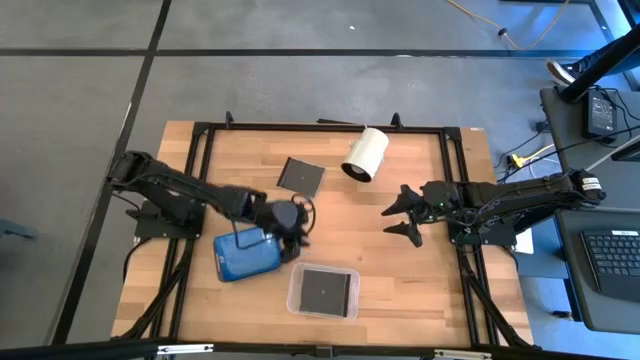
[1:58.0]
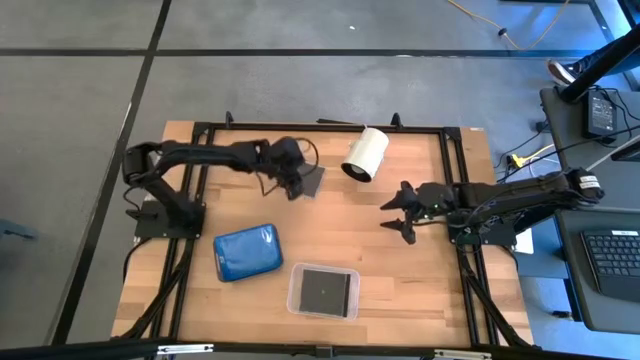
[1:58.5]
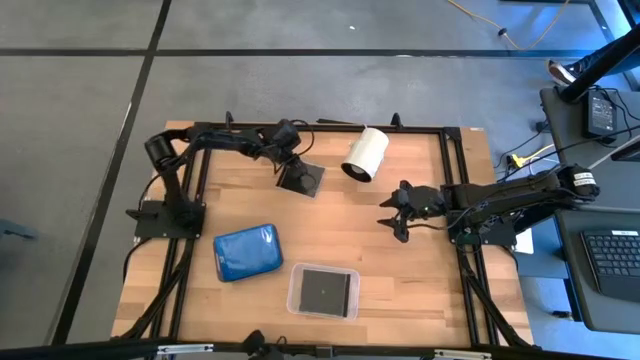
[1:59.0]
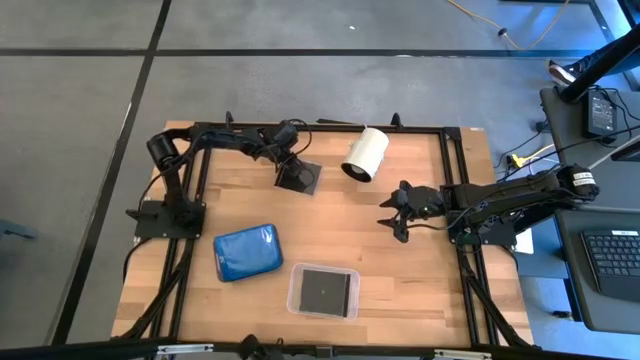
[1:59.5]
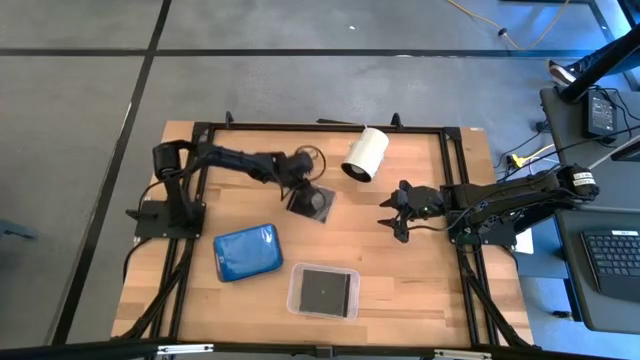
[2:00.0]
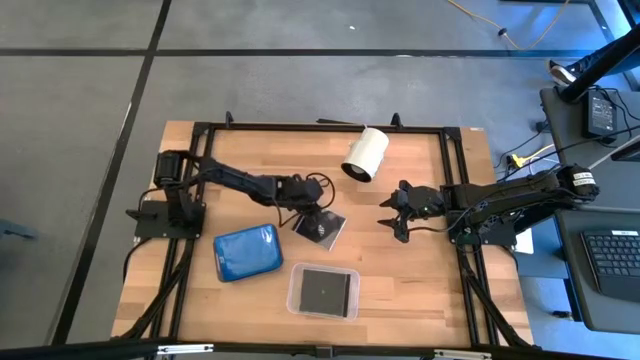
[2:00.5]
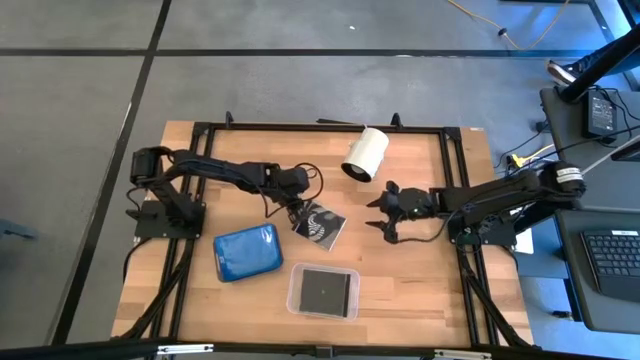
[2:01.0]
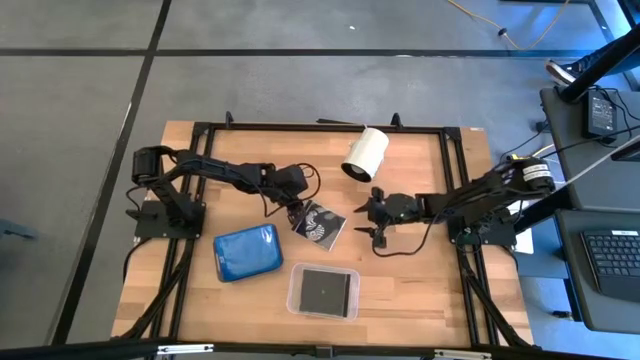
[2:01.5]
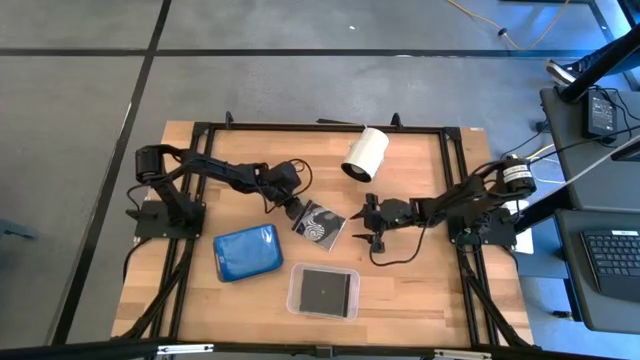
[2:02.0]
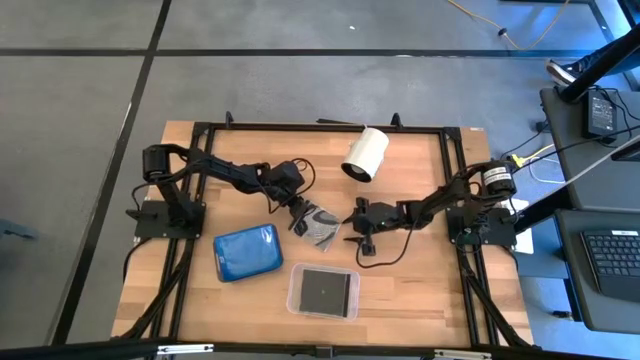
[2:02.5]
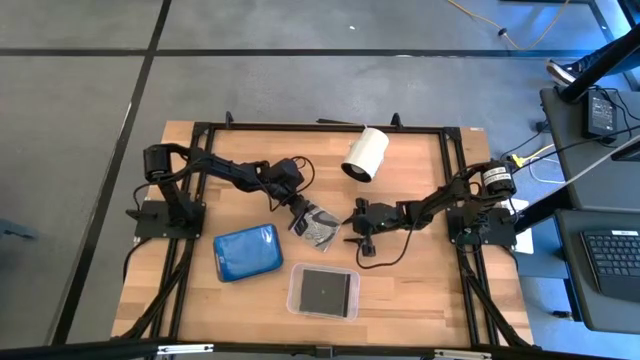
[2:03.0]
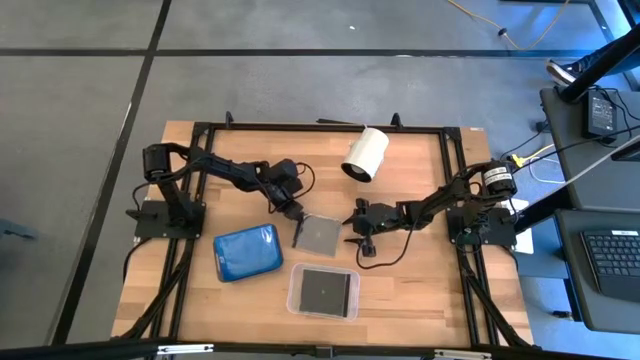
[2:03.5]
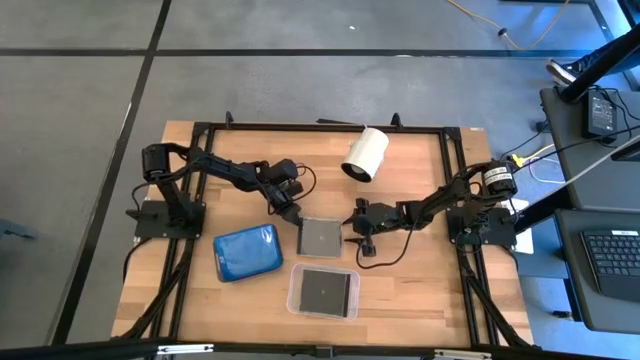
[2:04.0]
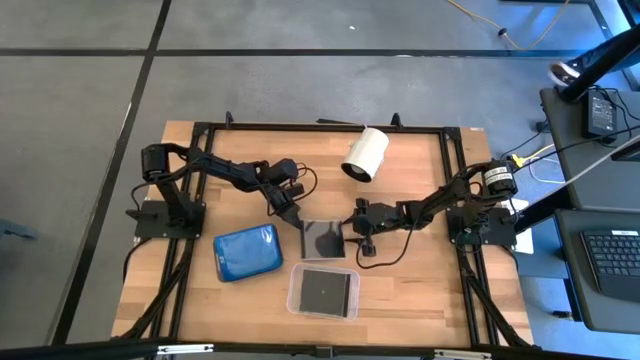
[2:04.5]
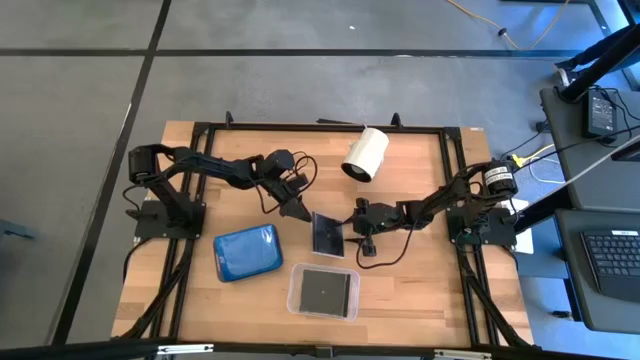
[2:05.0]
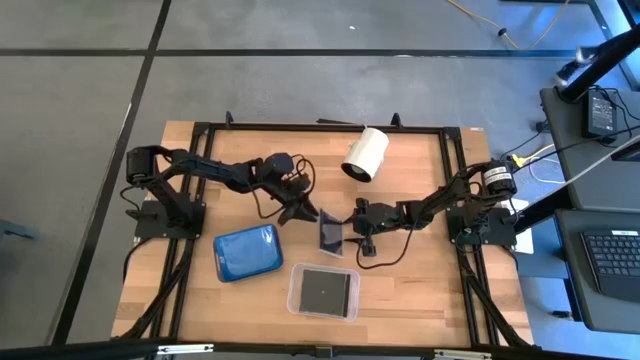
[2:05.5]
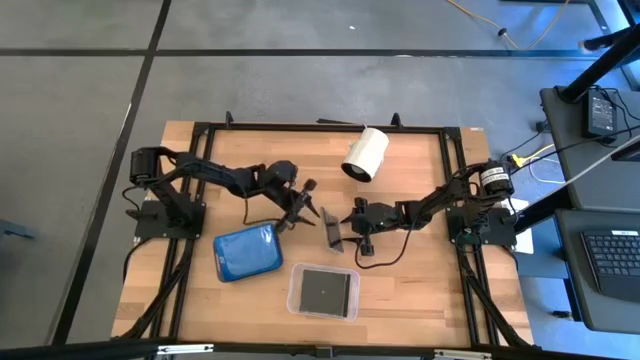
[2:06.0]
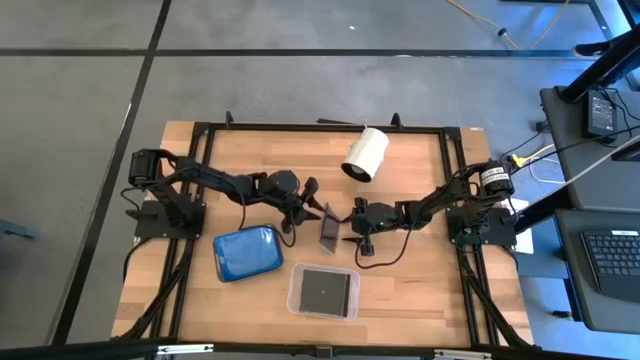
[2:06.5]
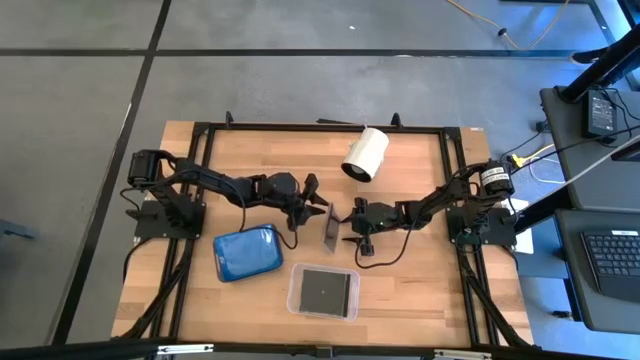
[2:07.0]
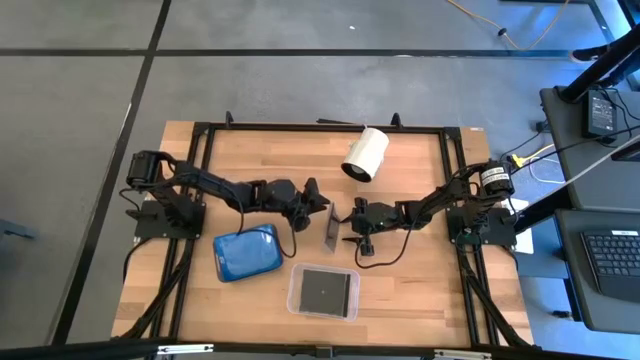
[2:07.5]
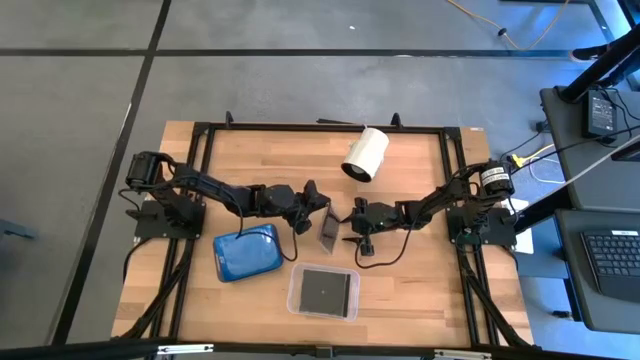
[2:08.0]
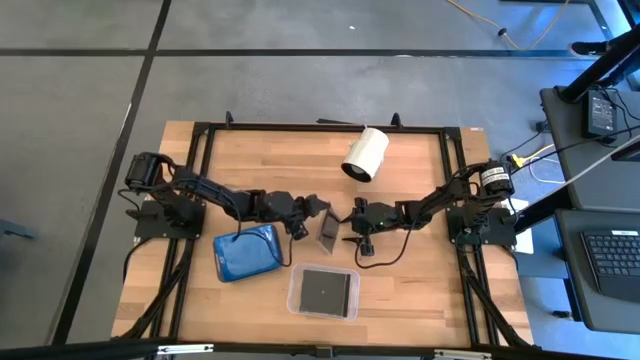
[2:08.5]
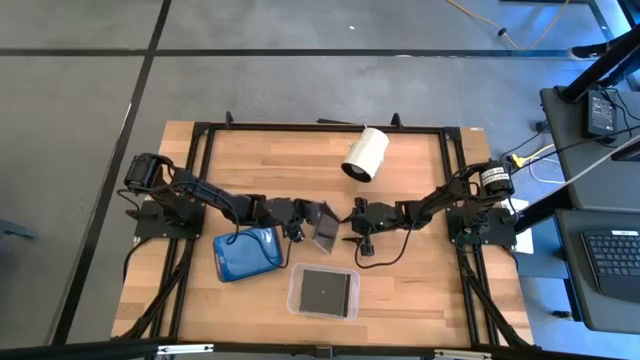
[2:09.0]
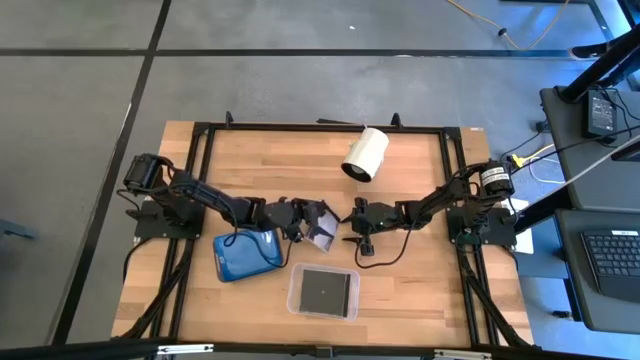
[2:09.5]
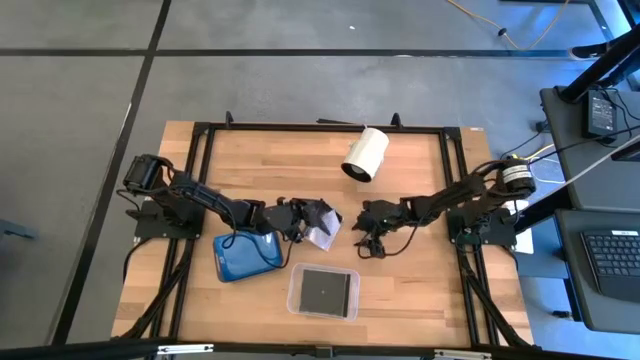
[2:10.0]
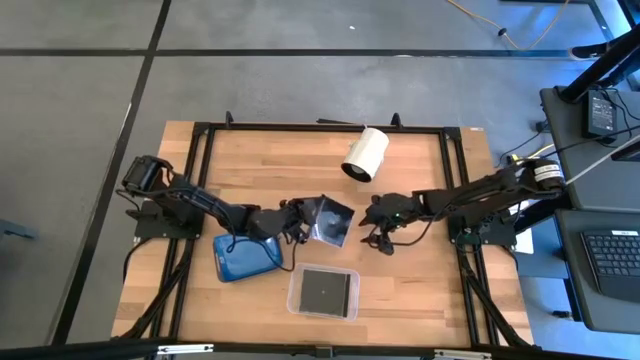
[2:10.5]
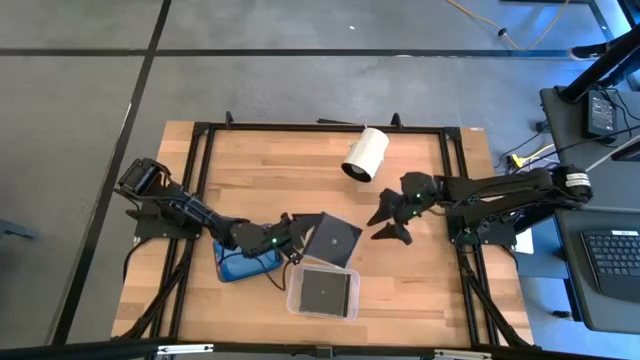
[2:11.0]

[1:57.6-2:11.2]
Task: Pick & place jewel cases by type
Put the black CD case into the transparent bin

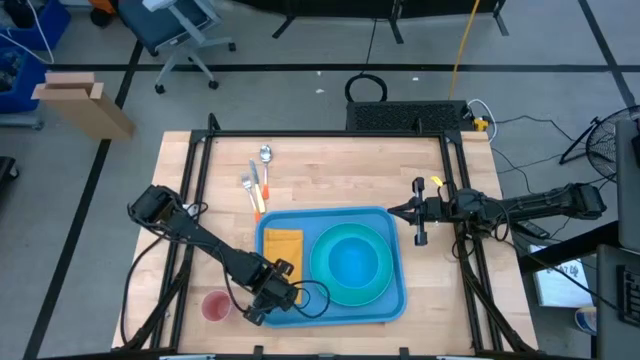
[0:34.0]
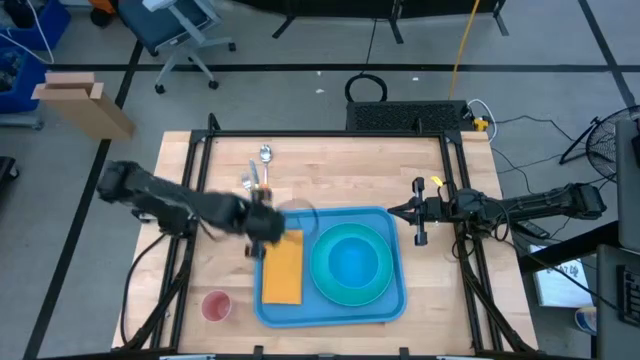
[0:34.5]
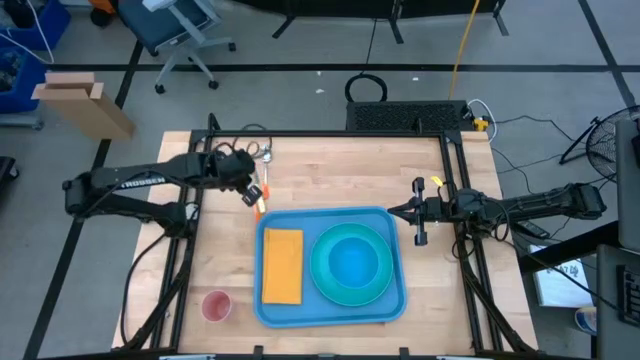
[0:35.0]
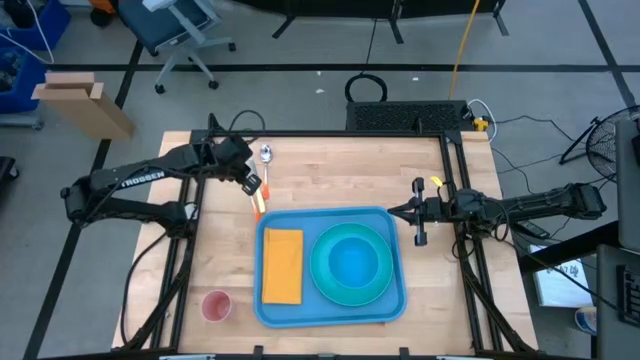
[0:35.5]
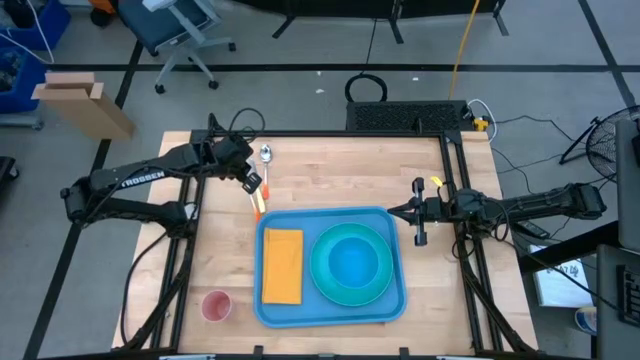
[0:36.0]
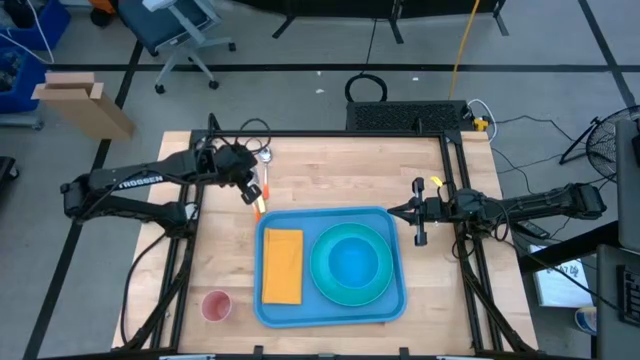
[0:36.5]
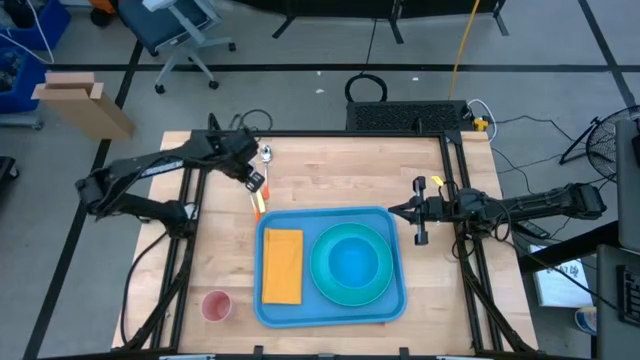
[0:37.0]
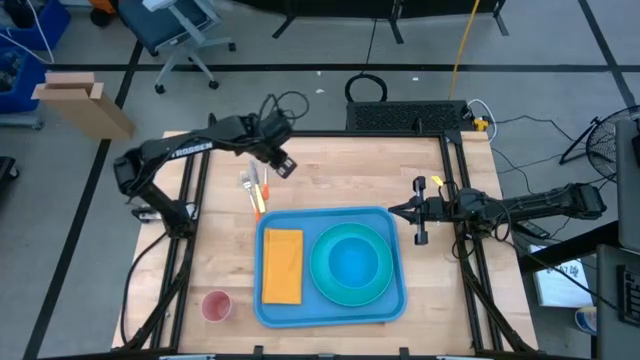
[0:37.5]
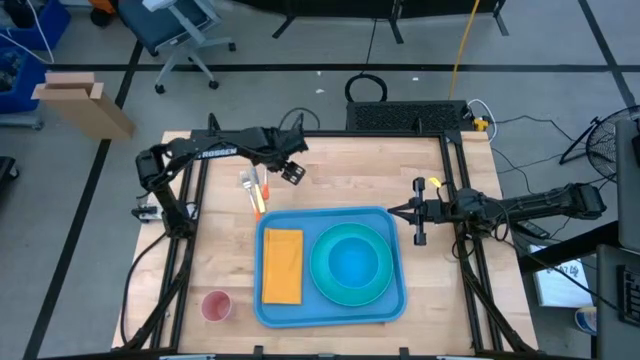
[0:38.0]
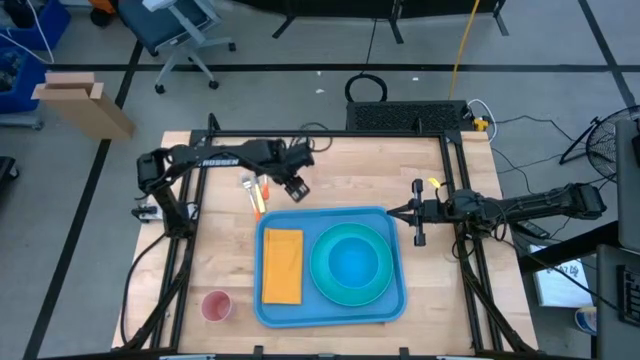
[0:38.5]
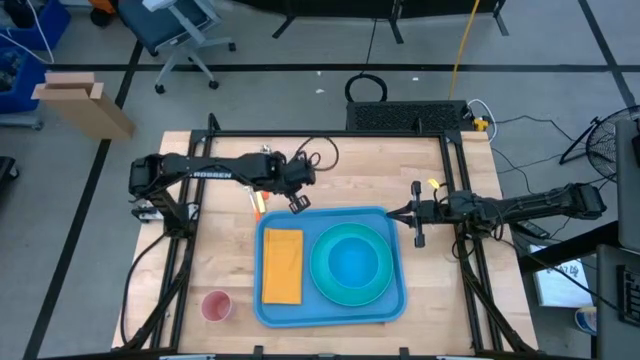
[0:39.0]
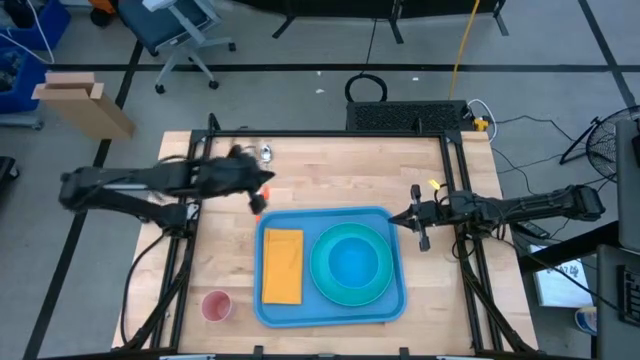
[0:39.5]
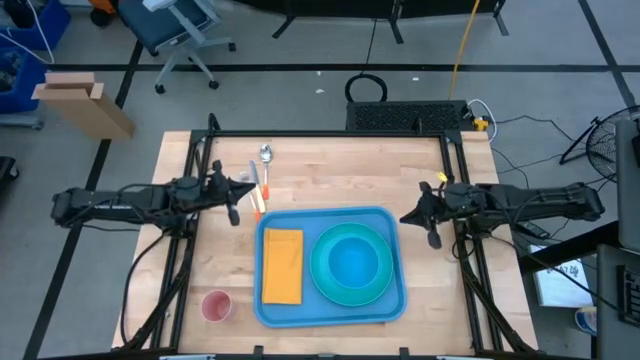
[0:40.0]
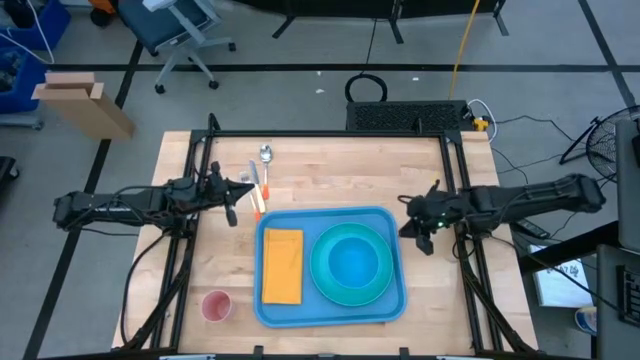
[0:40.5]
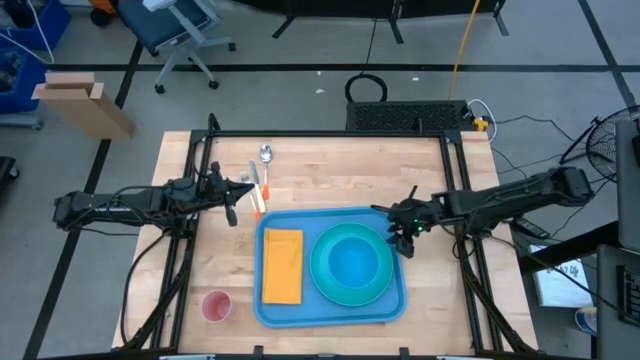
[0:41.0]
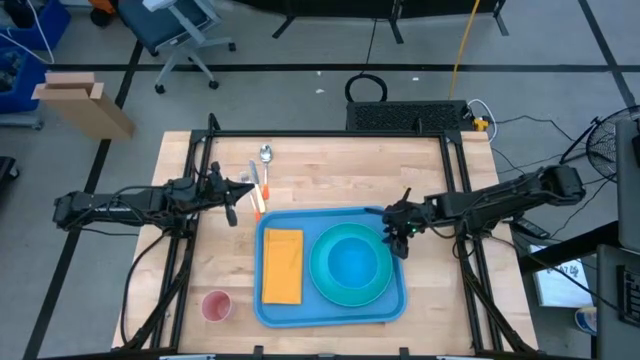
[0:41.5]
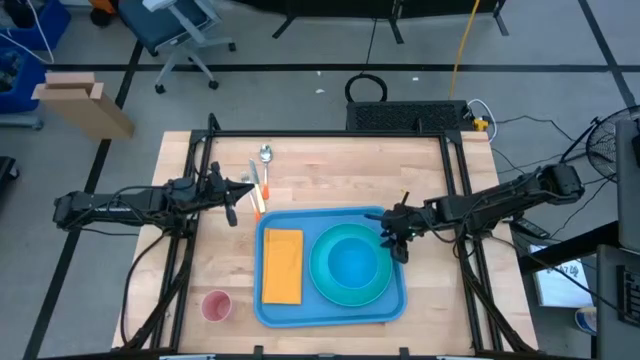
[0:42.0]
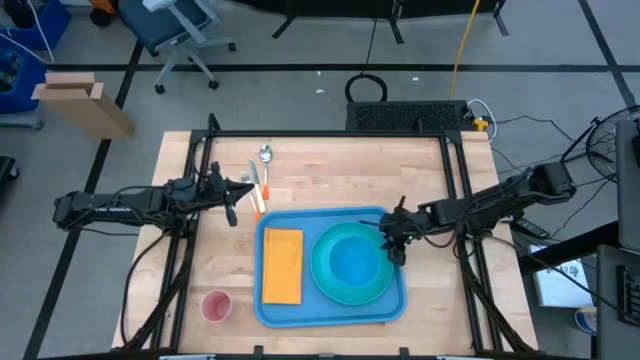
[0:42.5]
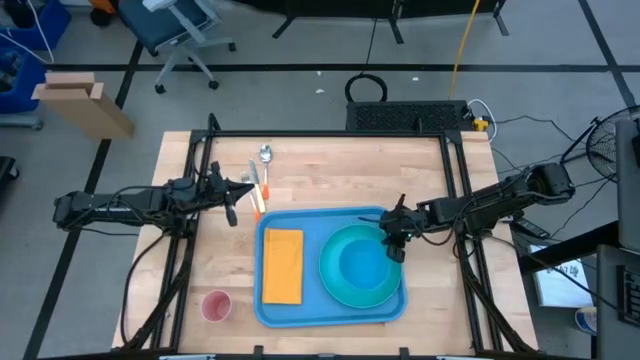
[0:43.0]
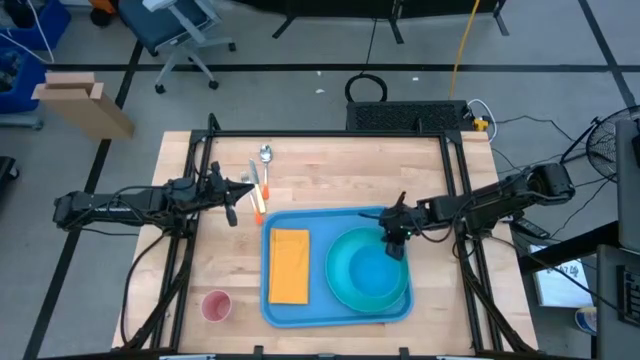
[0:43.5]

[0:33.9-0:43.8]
Task: Set up tray
Adjust the light green plate on the blue serving tray
